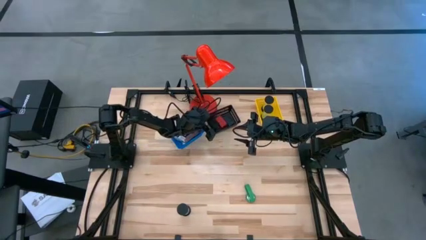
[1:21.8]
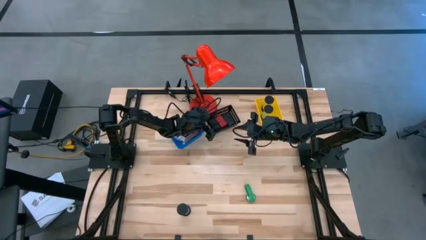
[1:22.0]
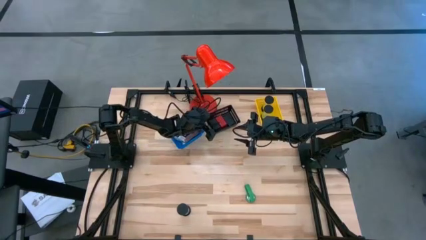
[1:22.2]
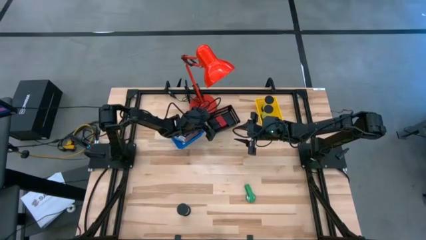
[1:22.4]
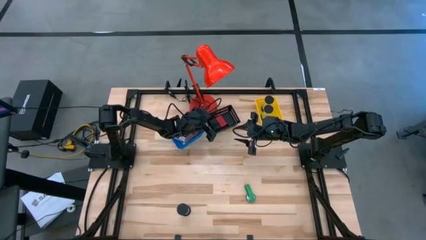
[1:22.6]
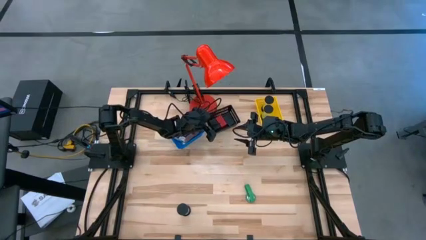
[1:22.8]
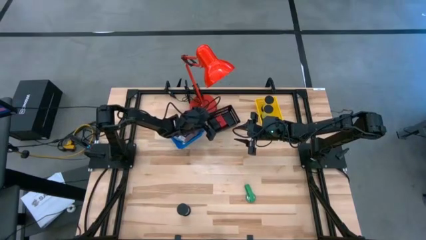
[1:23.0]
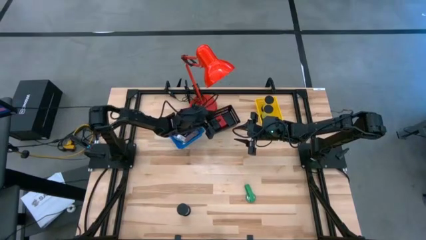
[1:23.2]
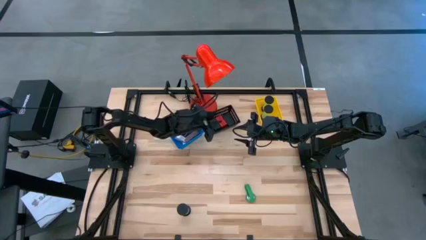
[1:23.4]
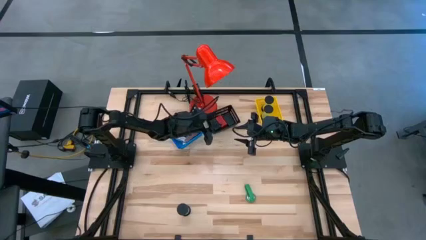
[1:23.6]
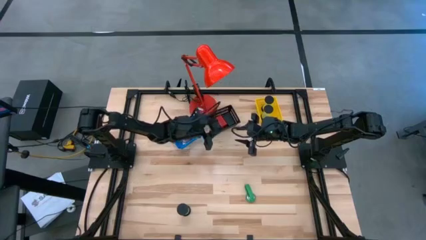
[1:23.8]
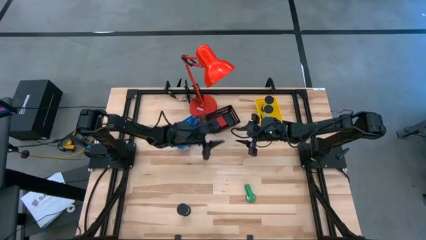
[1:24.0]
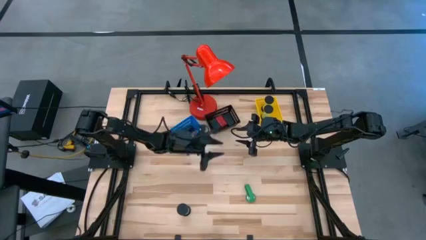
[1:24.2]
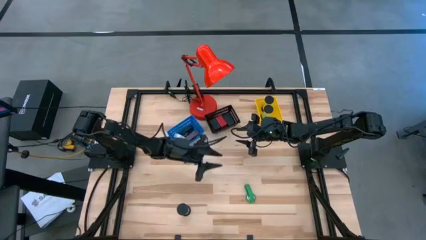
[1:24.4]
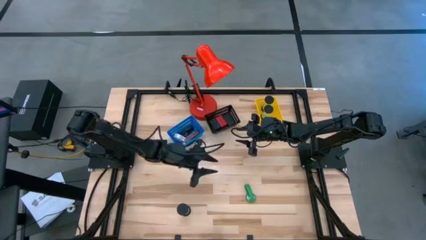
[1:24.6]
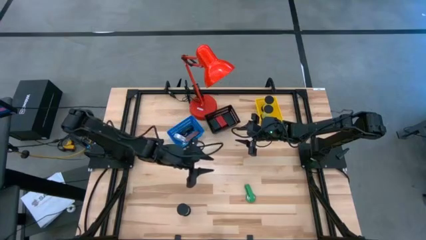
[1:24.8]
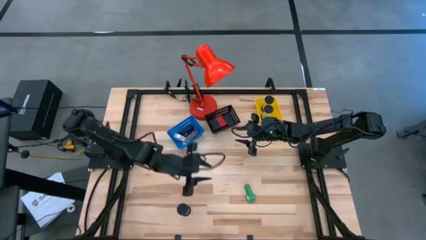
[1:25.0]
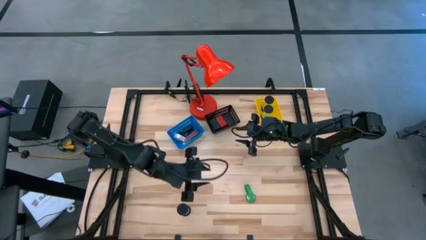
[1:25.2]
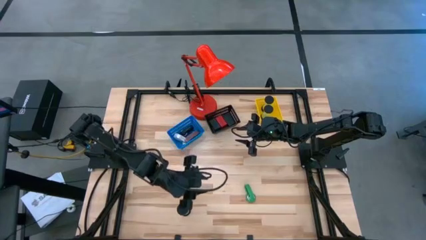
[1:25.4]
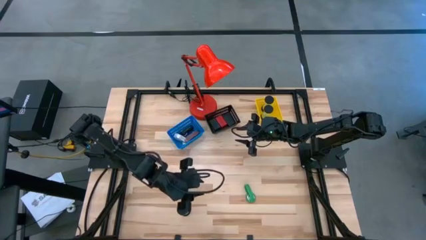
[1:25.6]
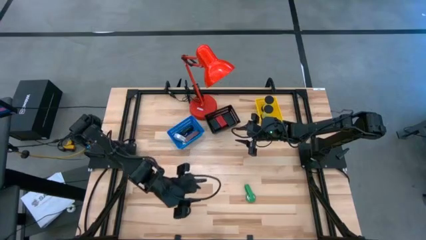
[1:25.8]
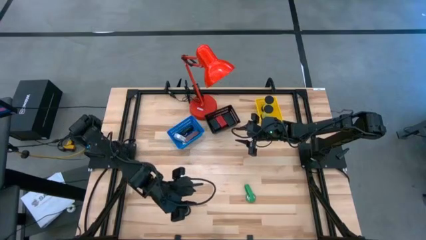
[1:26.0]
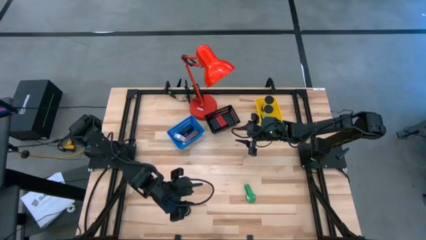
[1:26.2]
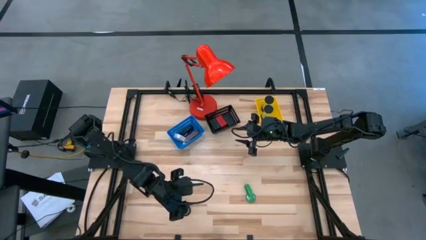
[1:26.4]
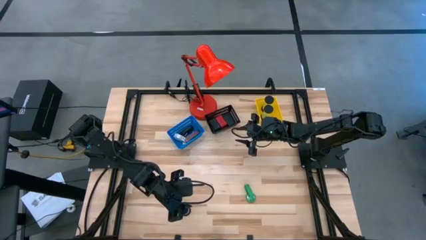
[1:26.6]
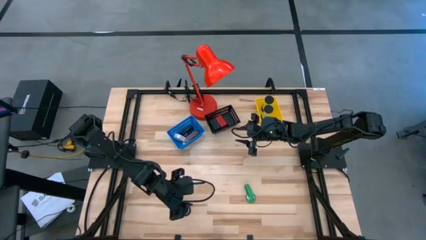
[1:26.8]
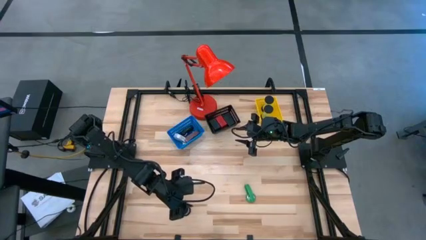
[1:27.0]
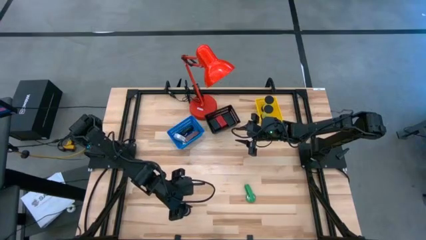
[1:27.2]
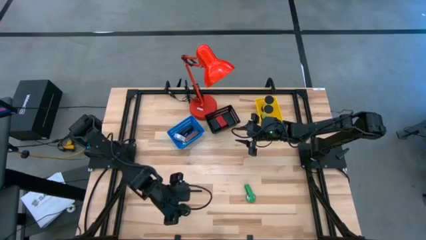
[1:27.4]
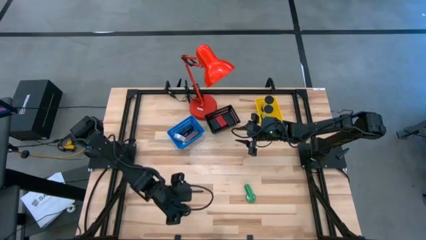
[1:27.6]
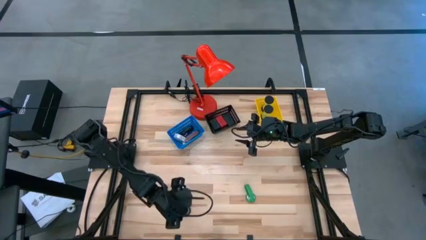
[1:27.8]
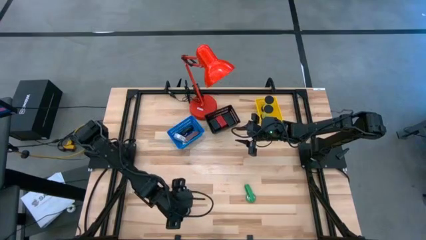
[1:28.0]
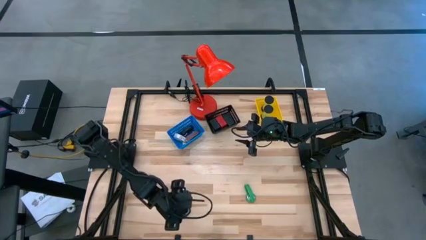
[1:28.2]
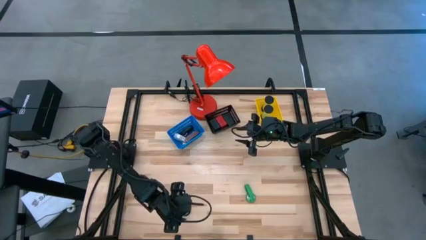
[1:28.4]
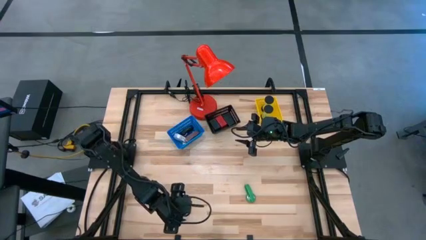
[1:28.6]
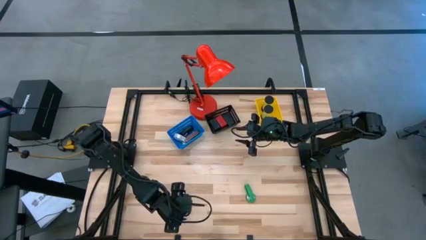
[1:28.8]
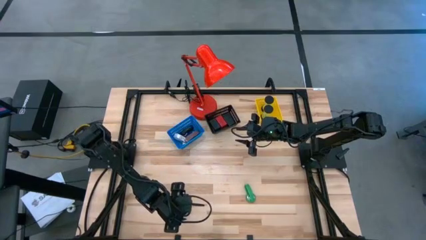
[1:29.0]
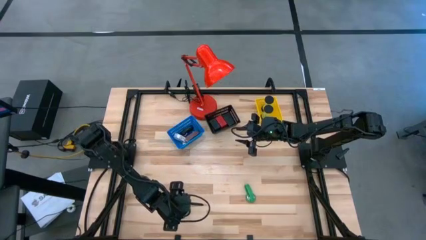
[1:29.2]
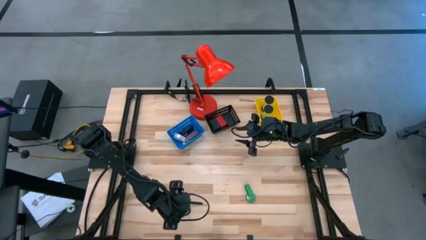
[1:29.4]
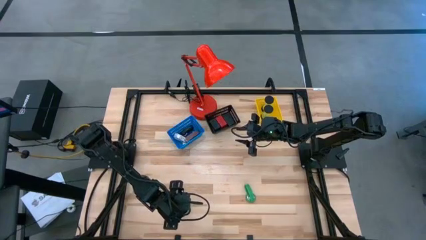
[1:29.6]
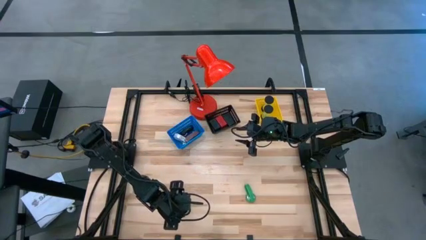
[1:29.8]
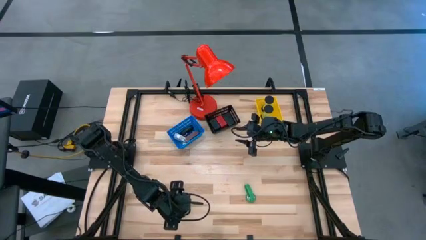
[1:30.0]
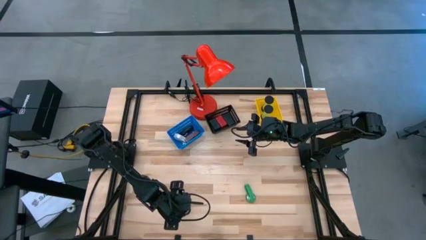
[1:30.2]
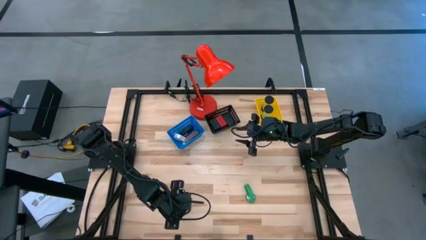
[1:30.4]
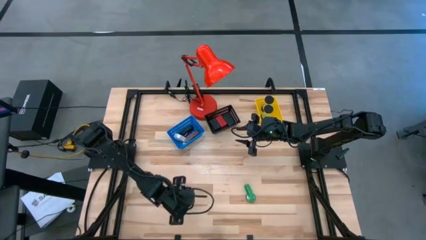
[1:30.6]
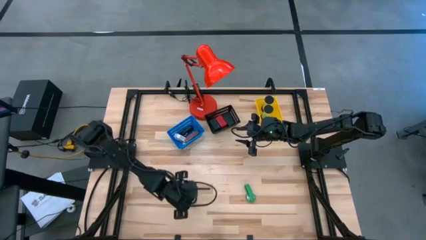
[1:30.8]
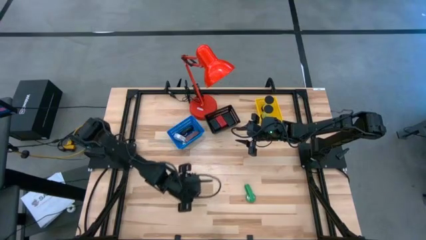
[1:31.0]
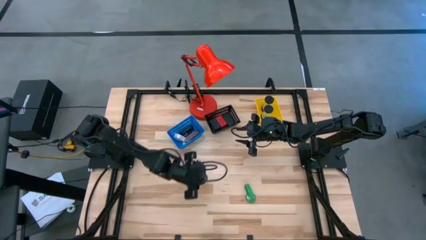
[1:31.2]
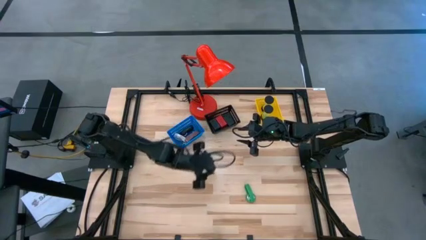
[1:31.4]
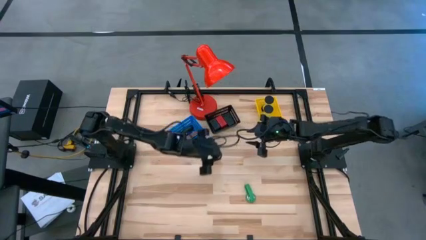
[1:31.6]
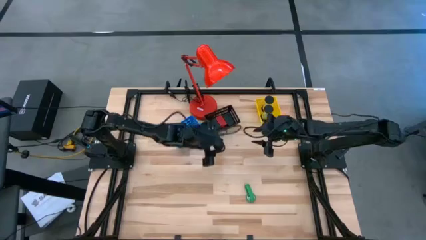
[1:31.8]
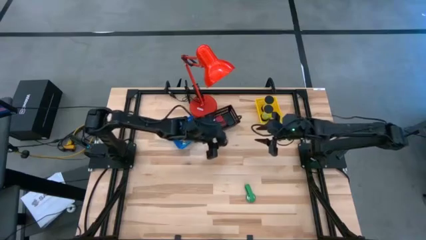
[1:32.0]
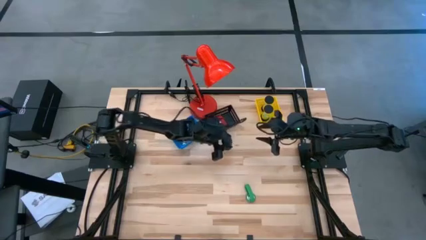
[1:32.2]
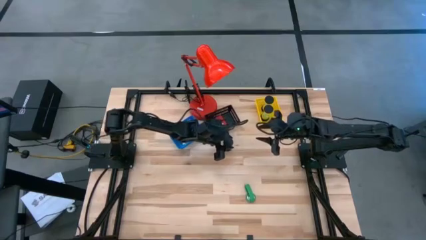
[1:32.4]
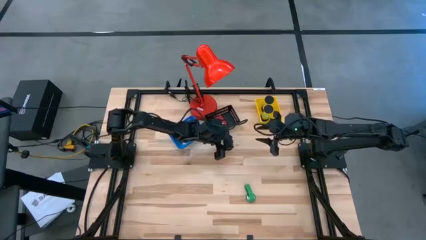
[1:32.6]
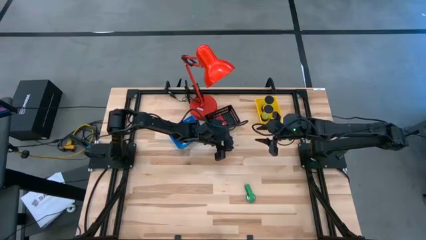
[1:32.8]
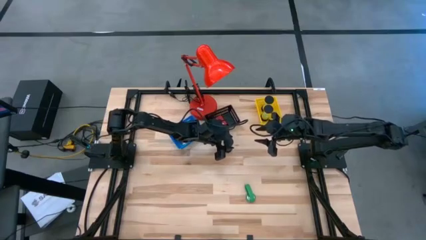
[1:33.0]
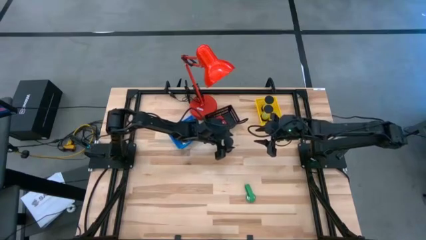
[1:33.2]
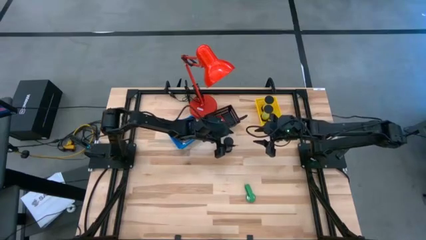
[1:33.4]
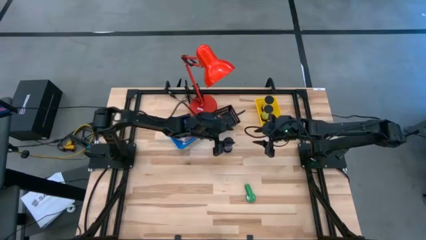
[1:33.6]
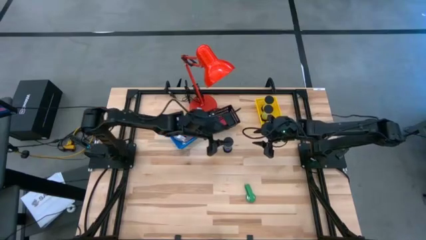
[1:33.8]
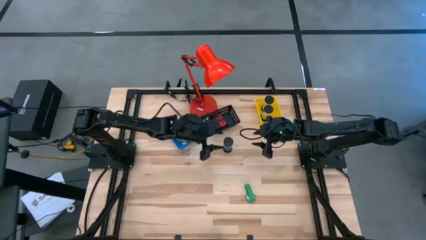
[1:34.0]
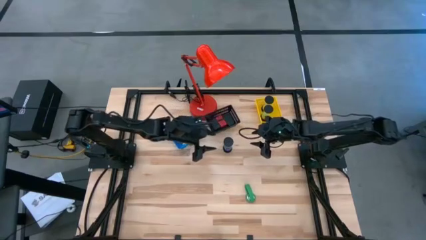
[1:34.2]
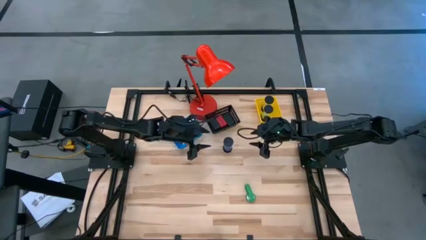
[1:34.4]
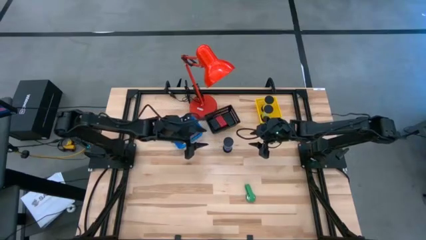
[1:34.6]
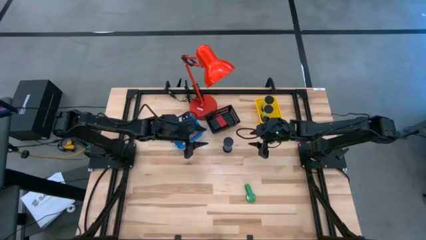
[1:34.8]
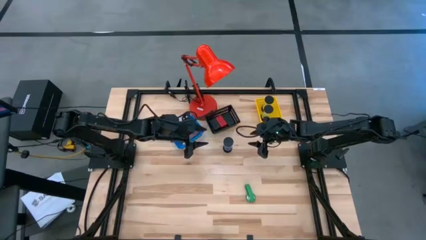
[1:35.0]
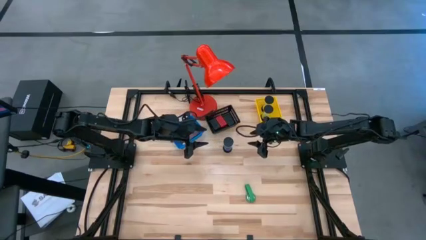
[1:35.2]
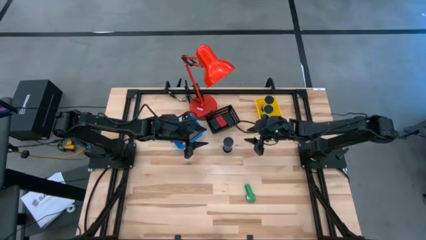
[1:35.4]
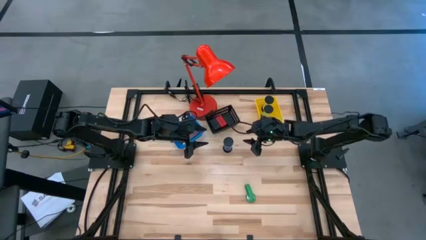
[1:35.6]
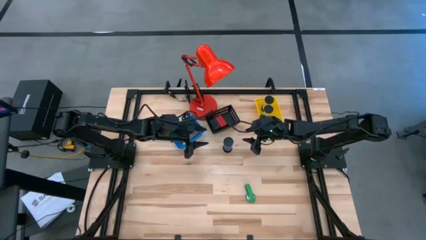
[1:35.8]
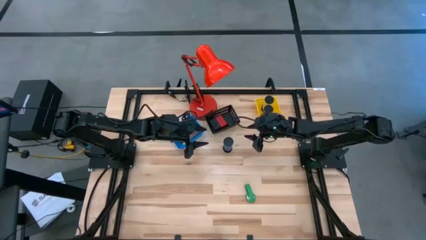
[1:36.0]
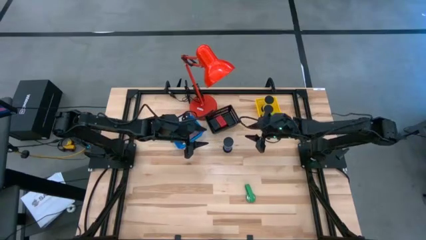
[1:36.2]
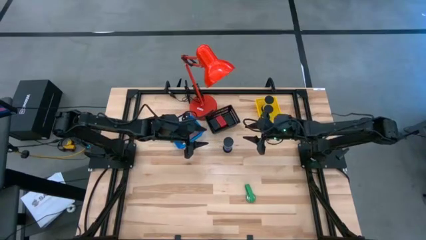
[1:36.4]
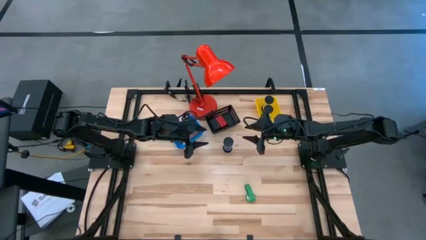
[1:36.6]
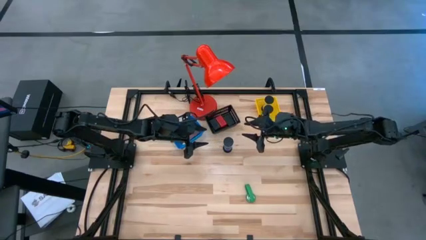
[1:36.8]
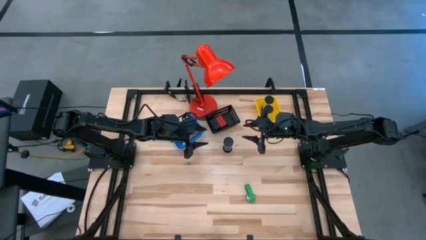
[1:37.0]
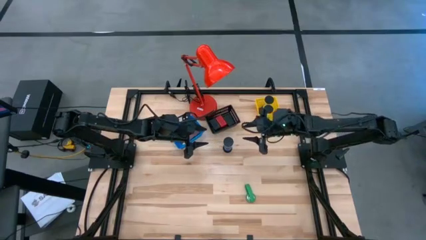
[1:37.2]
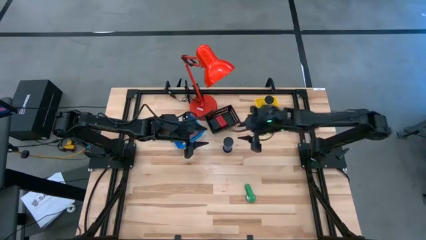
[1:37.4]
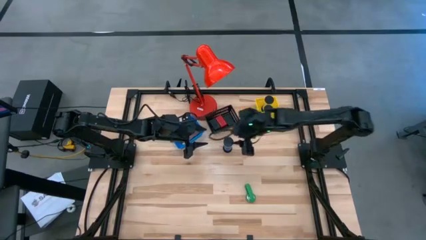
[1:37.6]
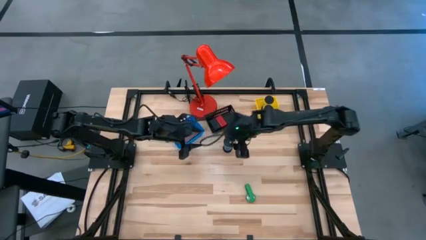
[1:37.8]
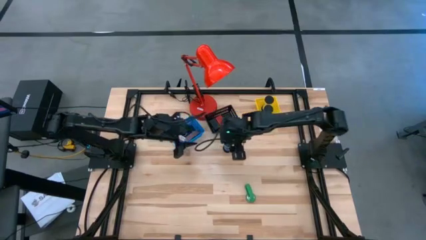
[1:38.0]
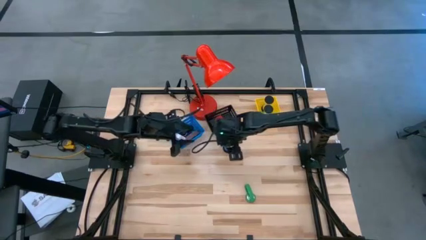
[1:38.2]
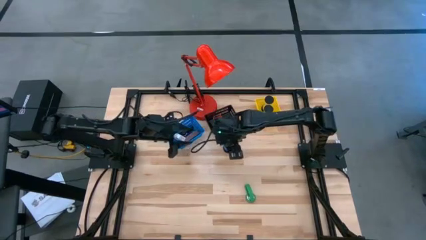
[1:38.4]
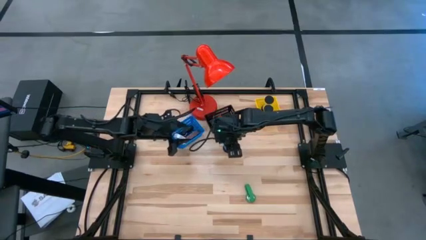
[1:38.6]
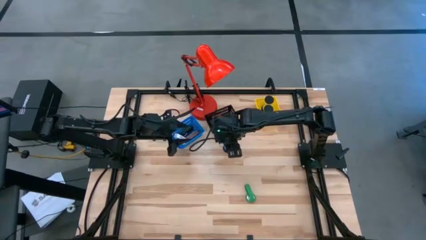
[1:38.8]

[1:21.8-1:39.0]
Task: Pick & Place Office items
Put the blue hourglass into the yellow bin
